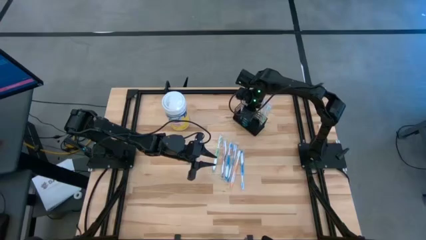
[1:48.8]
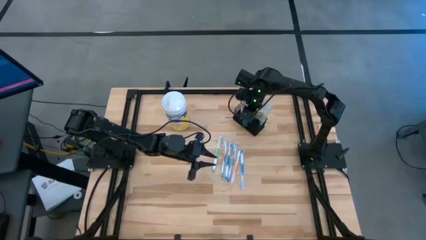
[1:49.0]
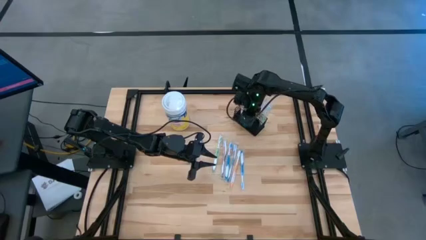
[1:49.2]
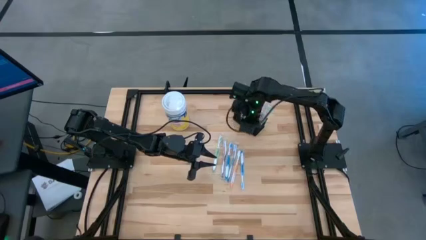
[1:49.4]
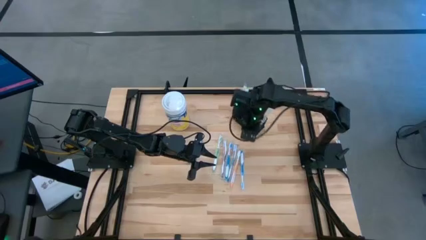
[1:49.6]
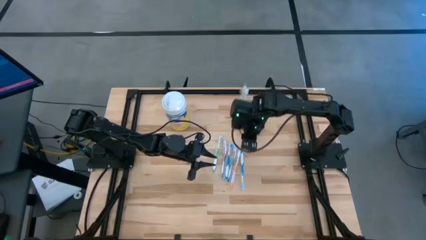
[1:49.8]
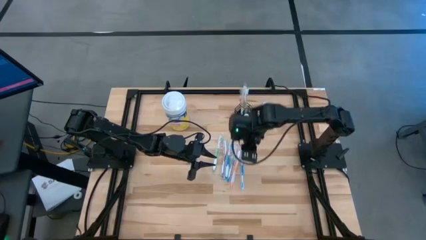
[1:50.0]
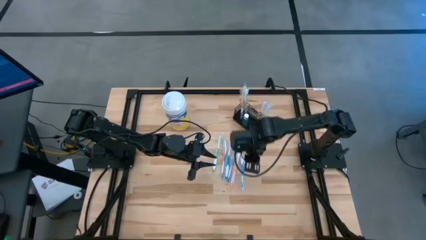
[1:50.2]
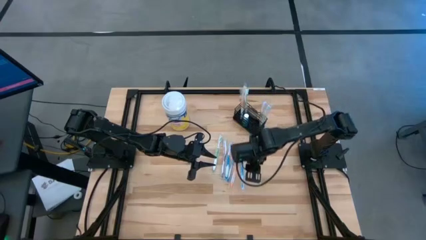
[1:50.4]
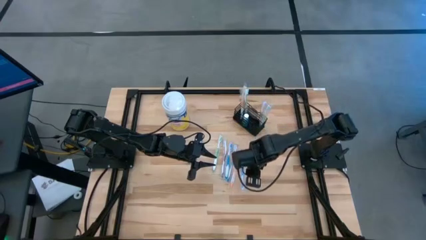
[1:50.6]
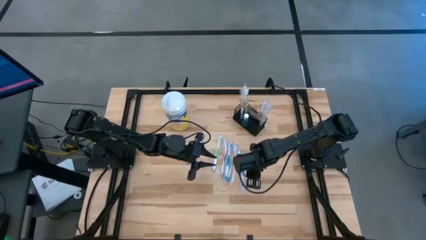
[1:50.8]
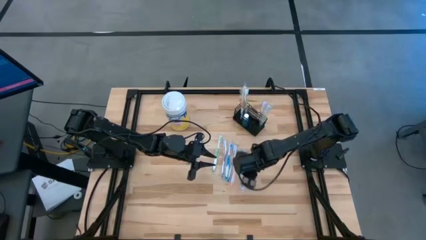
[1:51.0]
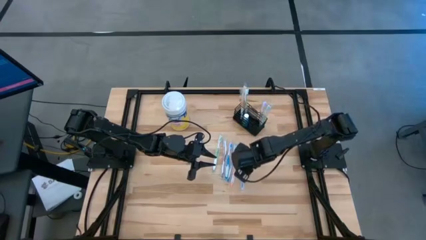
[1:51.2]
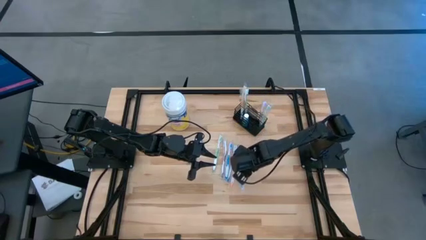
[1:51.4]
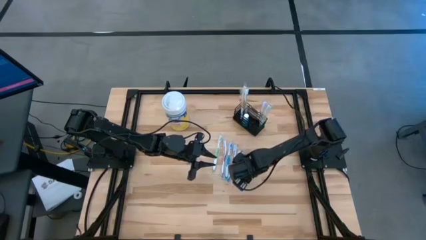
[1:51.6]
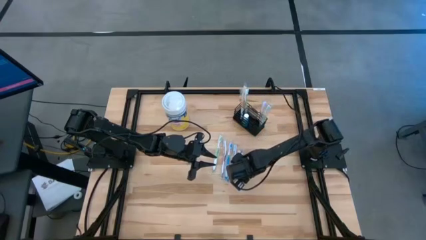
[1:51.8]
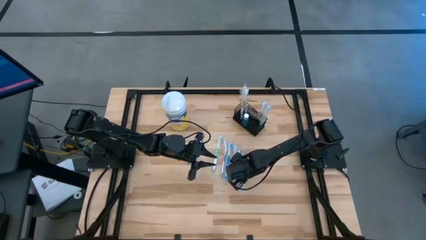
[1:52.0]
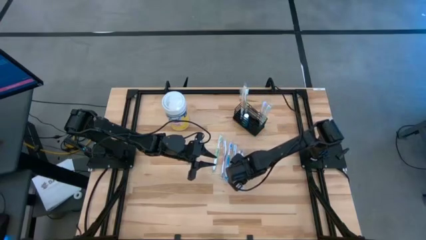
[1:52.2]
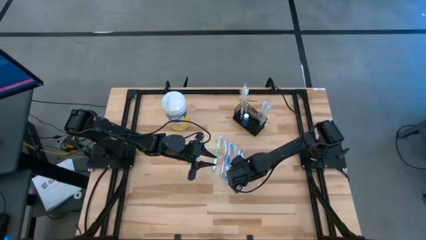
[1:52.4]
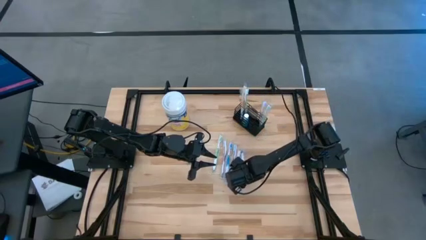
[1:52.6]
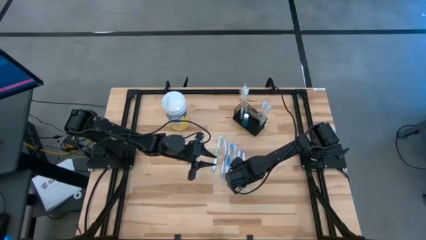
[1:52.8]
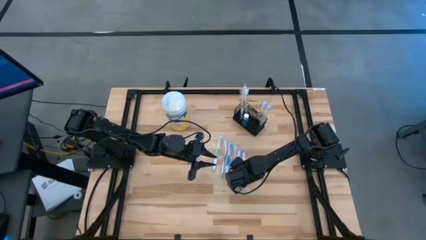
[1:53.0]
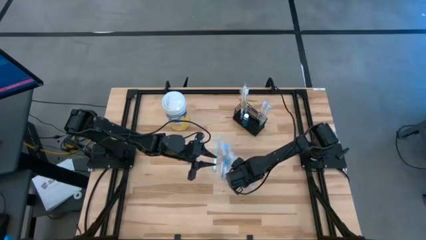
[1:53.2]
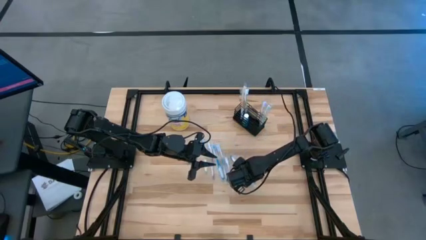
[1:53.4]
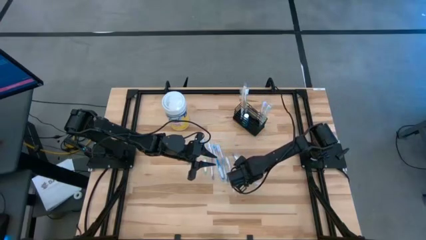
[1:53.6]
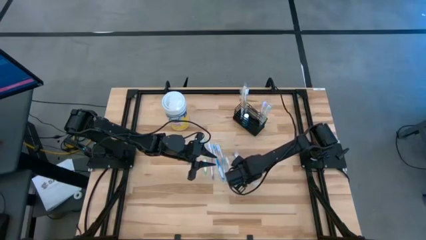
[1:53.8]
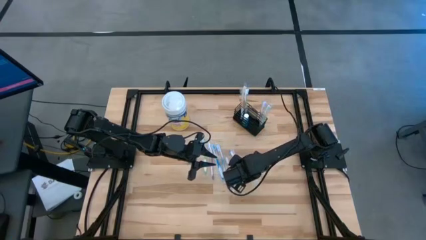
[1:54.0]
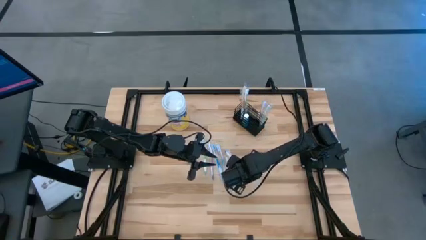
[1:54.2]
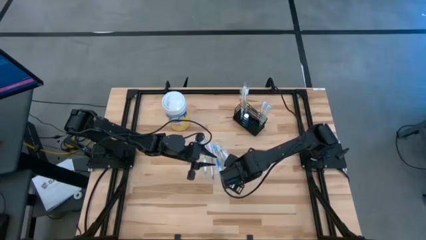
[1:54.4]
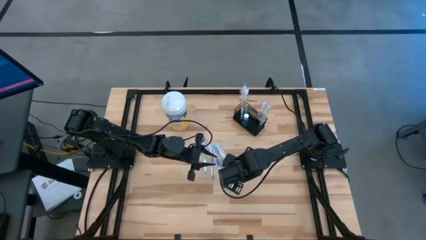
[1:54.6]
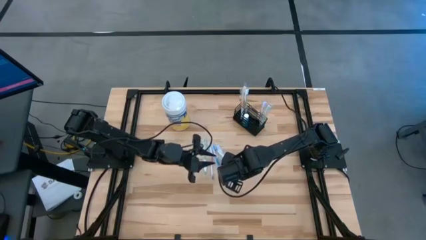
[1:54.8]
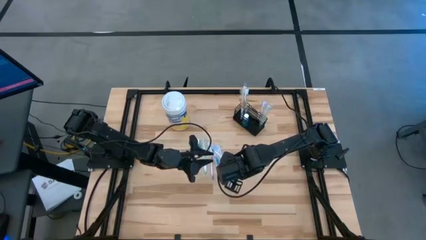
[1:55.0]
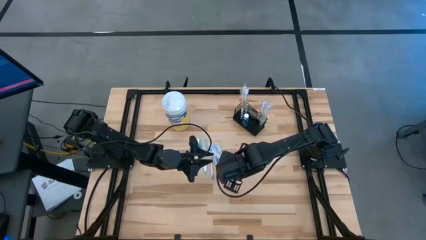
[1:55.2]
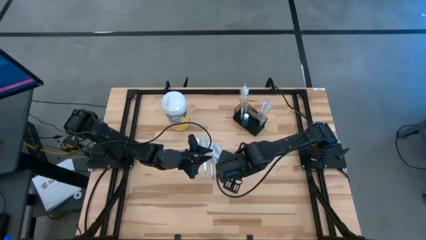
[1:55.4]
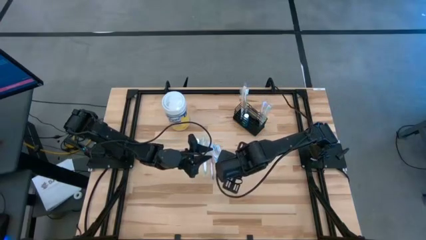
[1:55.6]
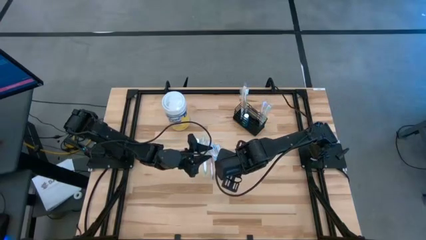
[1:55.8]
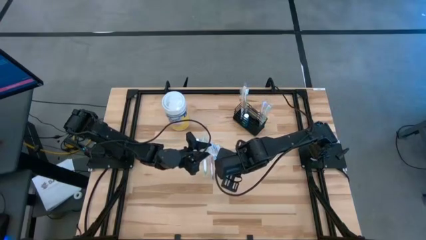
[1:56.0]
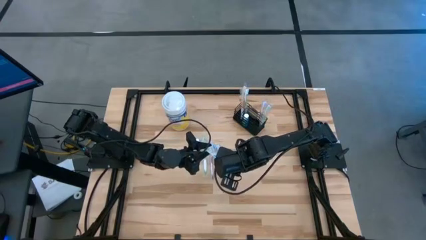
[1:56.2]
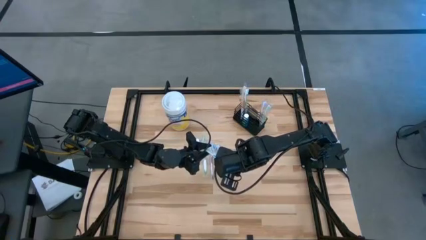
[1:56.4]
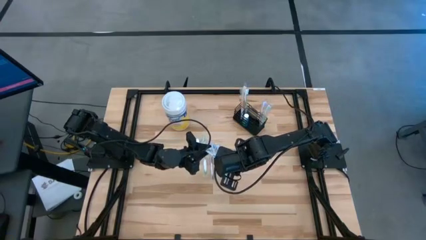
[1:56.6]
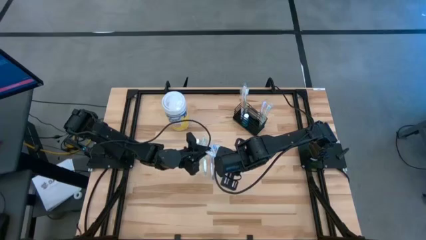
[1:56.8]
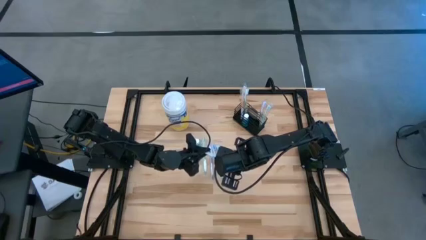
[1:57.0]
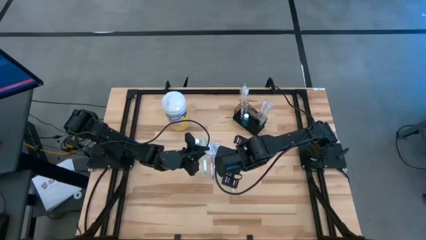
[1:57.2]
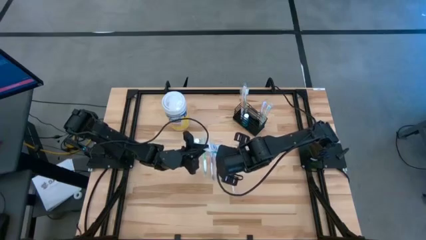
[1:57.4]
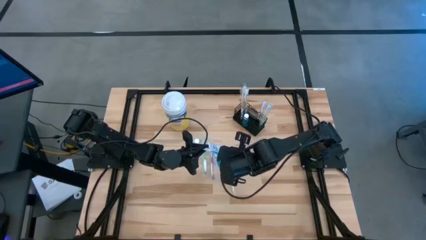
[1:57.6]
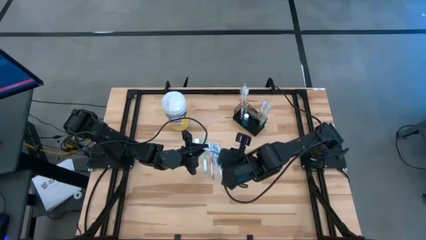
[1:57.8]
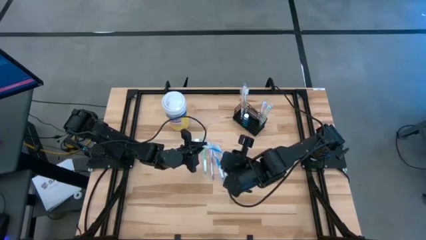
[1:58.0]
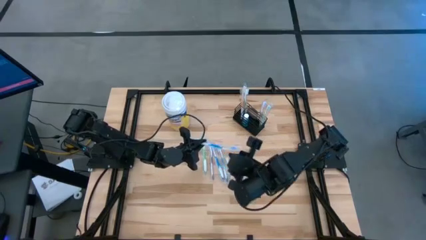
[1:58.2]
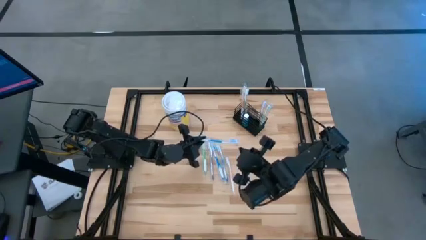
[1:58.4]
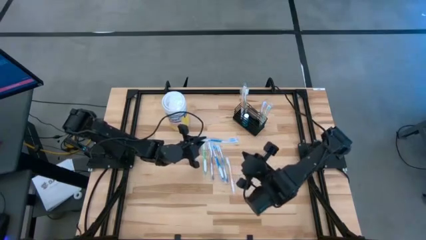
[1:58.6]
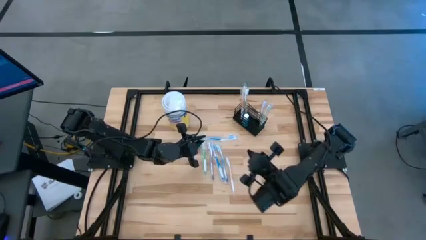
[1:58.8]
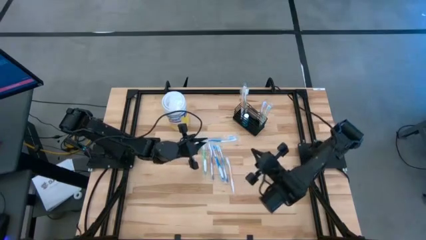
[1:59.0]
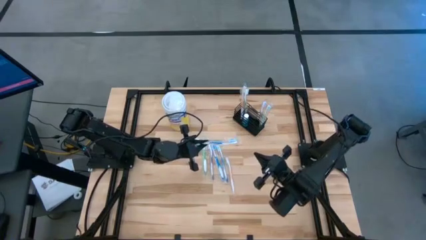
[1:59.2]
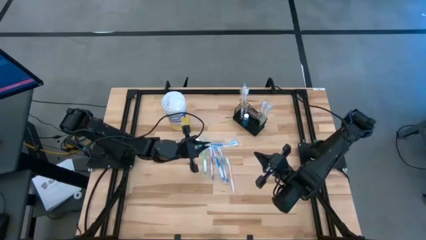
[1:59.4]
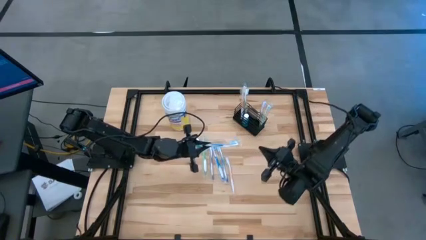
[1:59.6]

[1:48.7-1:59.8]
Task: Pick & Place toothbrushing station
Put the right blue toothbrush into the black wire organizer

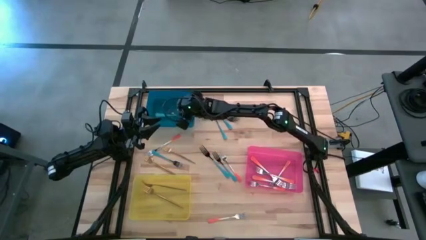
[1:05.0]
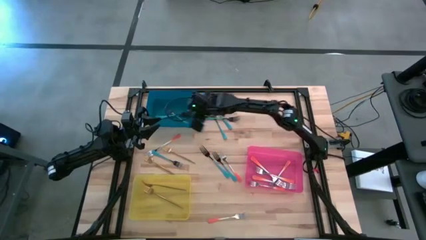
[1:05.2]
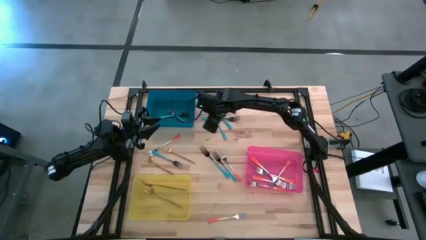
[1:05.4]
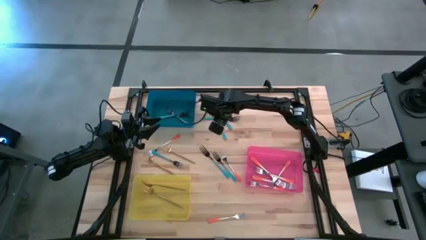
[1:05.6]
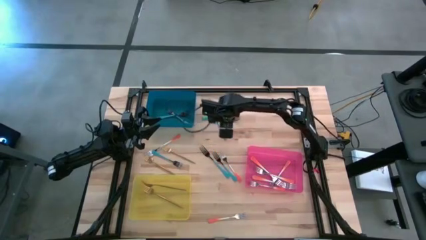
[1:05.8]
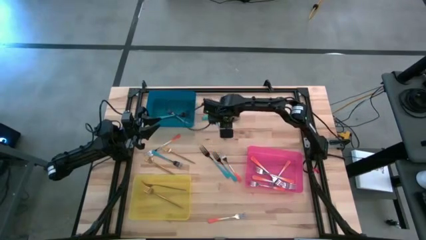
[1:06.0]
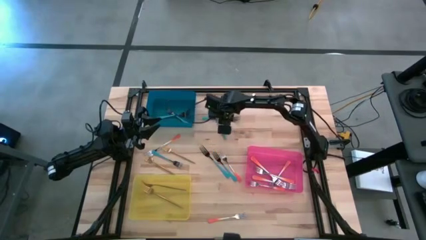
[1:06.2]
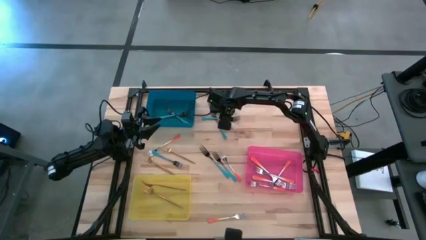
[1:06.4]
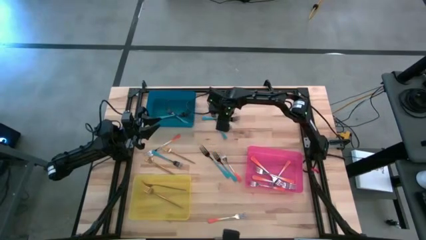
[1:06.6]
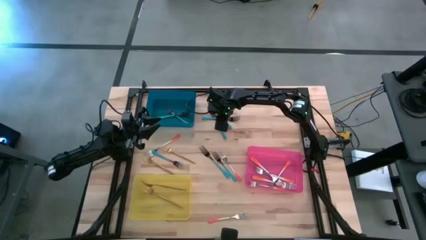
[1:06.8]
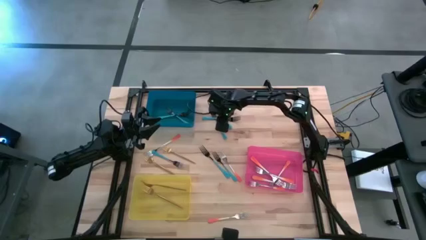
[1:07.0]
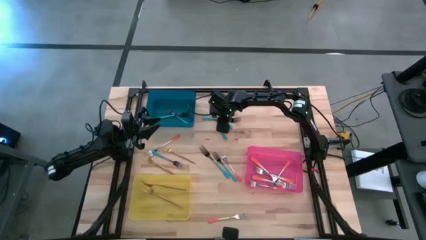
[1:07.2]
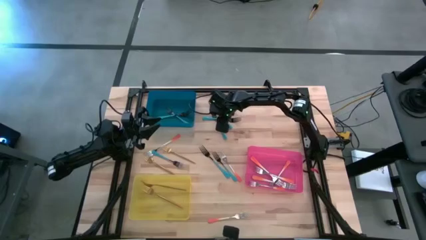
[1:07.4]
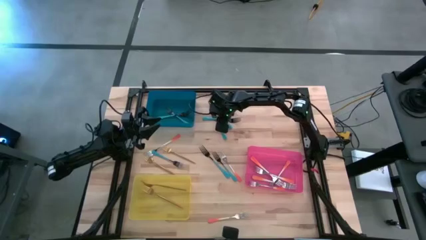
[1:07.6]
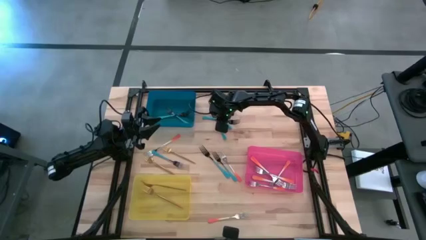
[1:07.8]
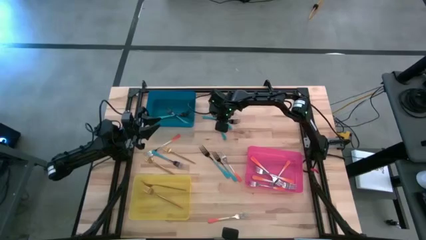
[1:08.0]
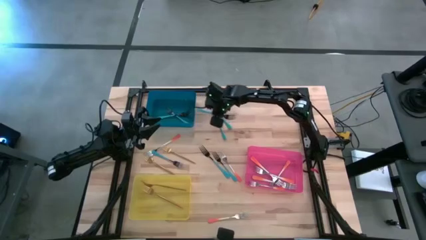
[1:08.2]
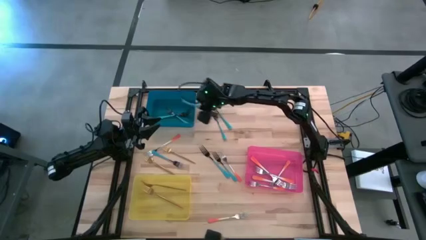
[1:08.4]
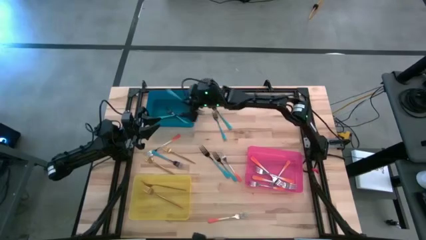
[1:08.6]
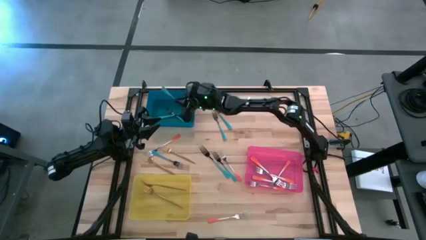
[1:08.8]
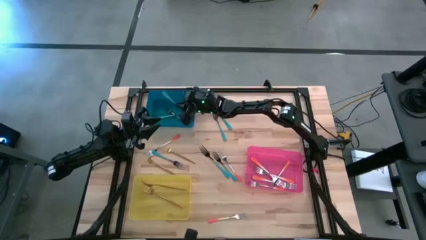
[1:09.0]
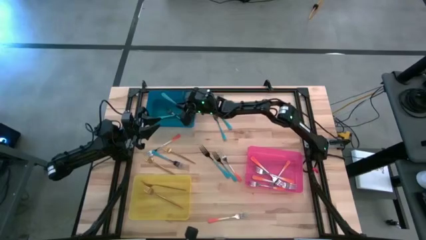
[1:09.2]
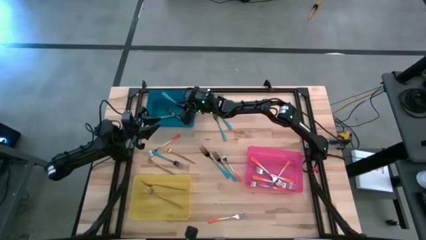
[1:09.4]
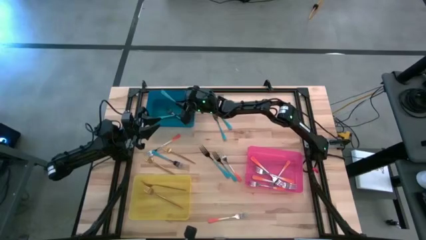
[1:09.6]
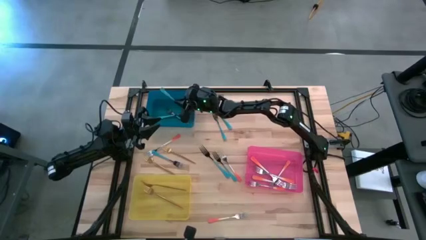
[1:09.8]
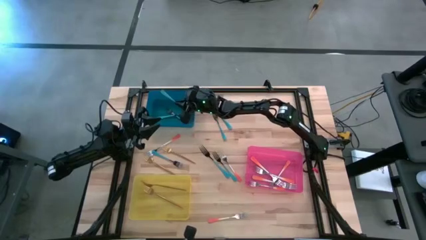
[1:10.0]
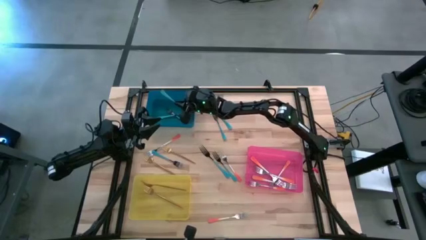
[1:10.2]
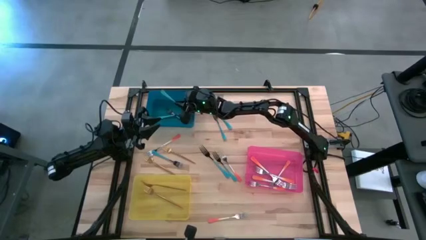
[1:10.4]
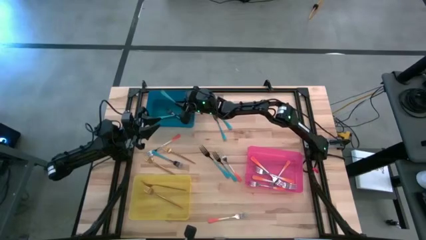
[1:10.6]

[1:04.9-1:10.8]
Task: Sort silverware by color (type)
Put the blue fork into the blue bin
